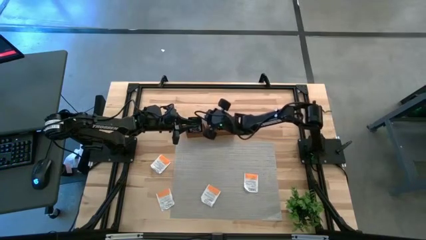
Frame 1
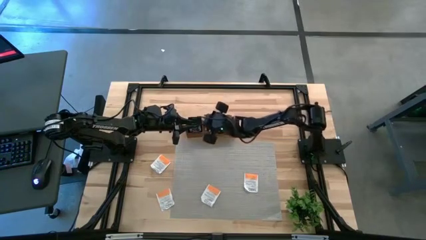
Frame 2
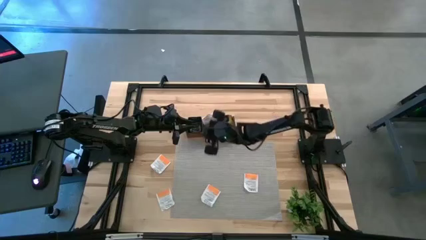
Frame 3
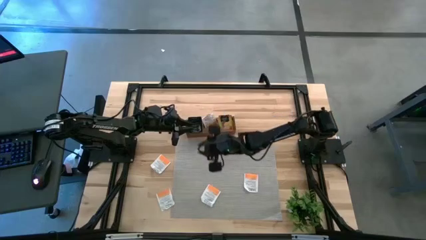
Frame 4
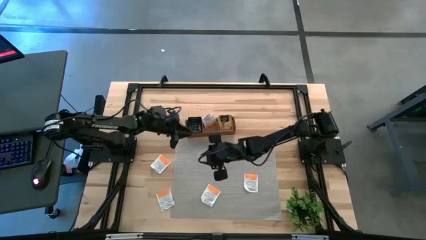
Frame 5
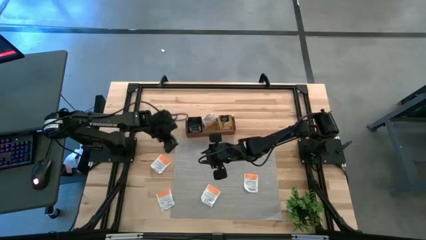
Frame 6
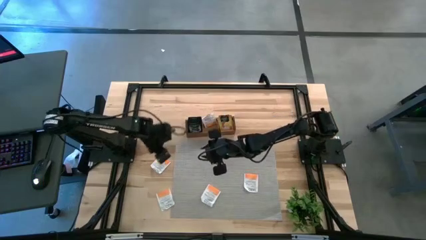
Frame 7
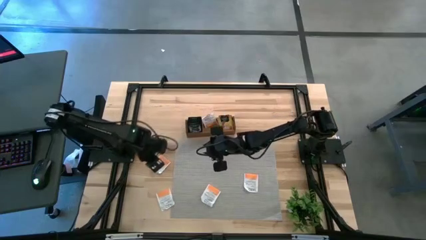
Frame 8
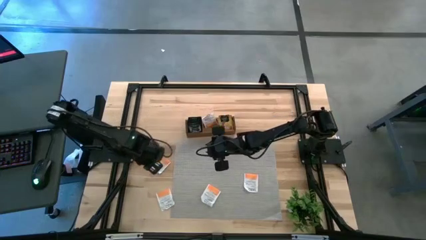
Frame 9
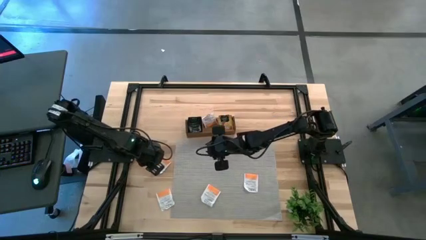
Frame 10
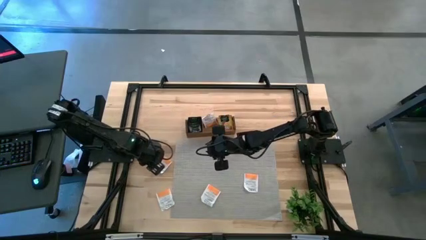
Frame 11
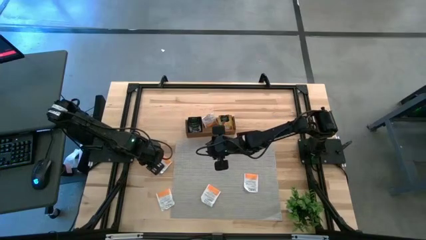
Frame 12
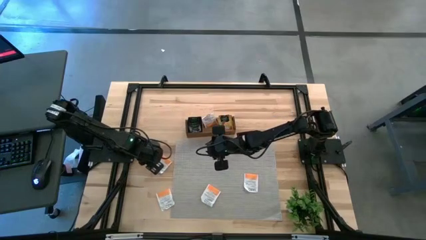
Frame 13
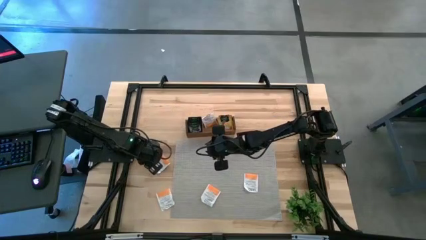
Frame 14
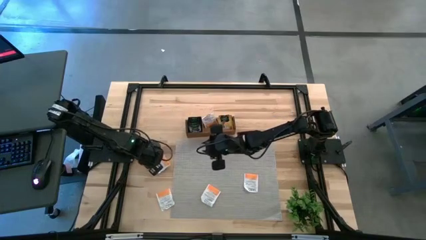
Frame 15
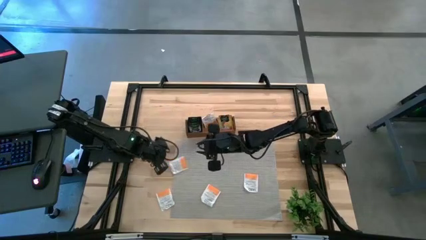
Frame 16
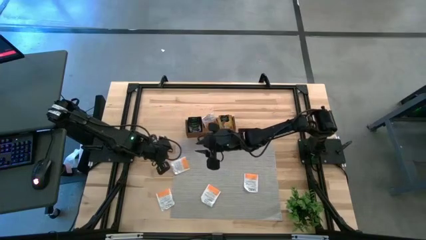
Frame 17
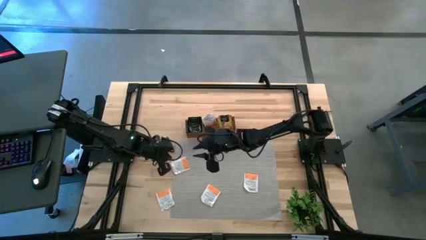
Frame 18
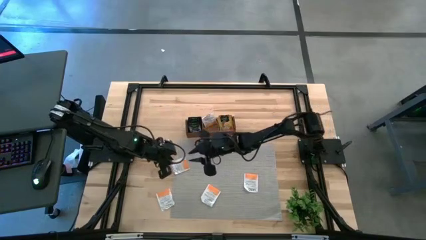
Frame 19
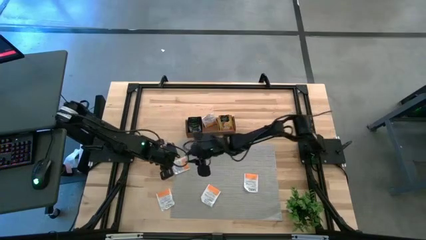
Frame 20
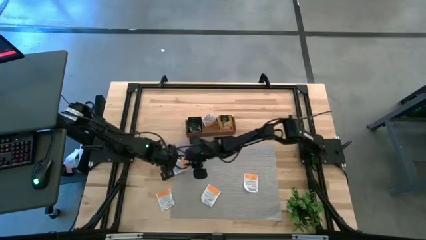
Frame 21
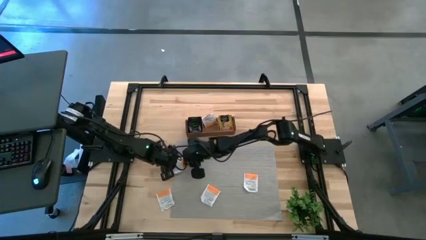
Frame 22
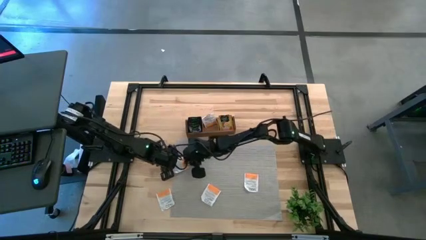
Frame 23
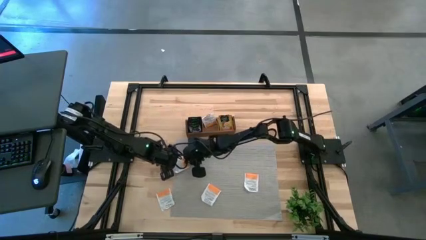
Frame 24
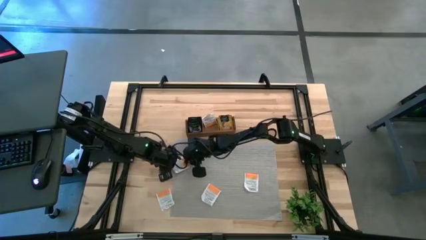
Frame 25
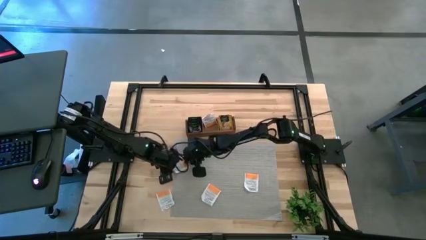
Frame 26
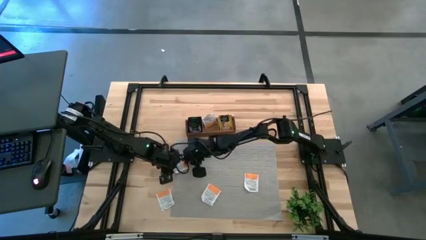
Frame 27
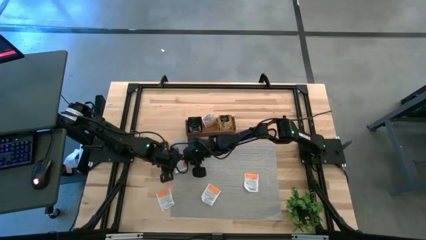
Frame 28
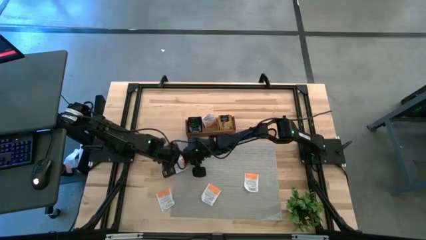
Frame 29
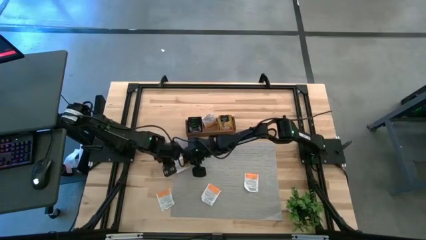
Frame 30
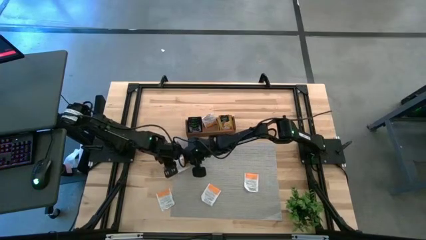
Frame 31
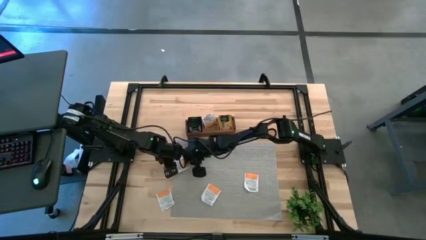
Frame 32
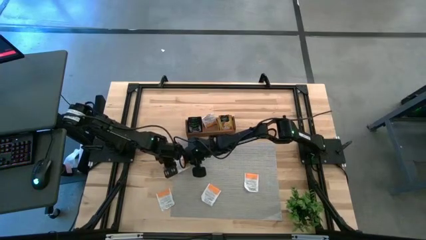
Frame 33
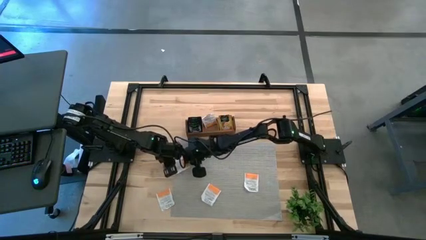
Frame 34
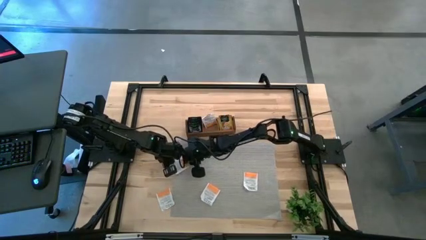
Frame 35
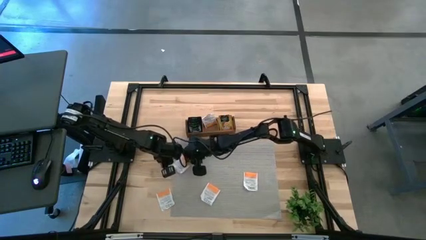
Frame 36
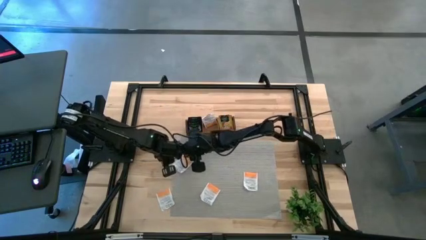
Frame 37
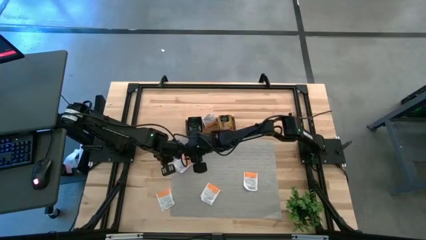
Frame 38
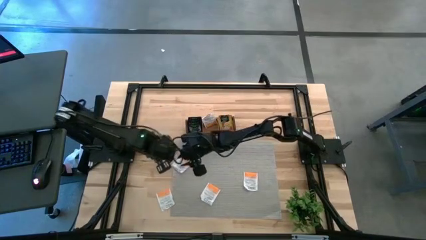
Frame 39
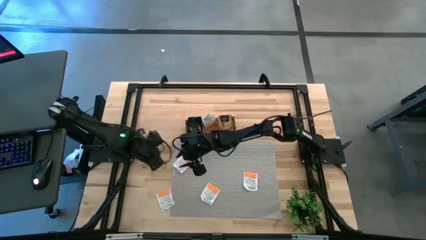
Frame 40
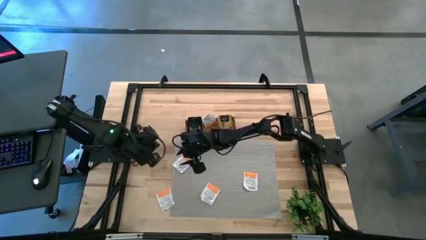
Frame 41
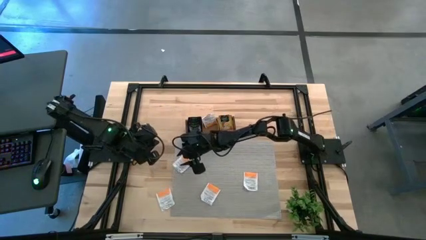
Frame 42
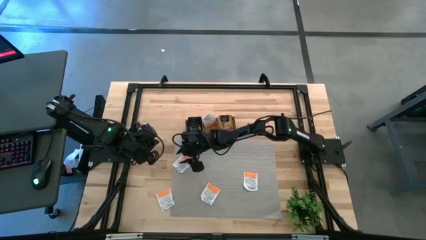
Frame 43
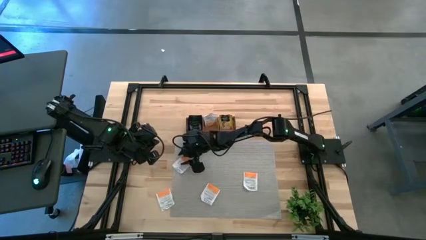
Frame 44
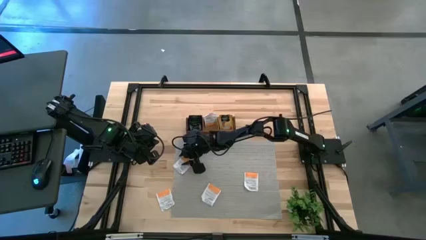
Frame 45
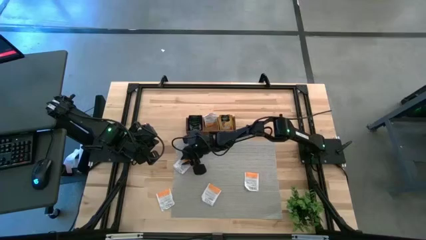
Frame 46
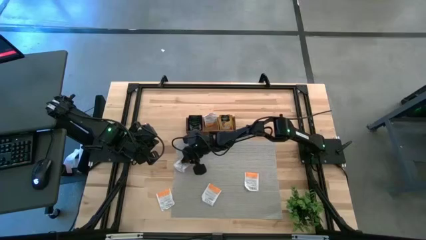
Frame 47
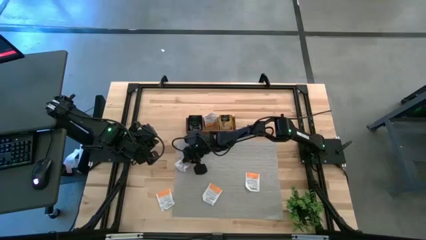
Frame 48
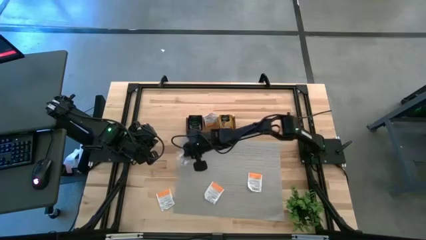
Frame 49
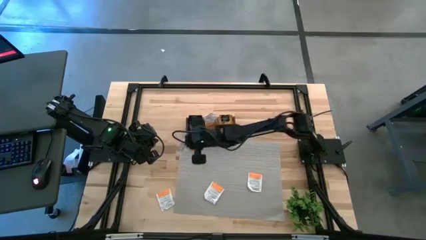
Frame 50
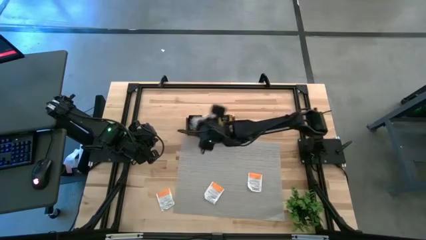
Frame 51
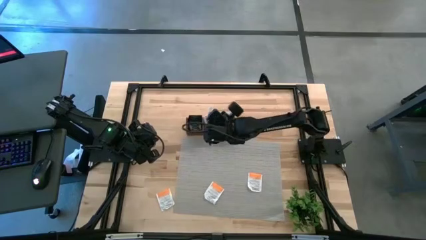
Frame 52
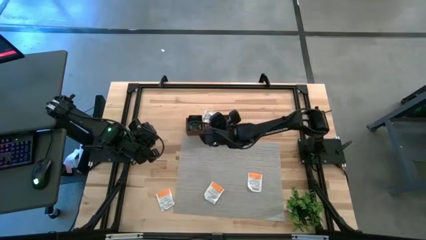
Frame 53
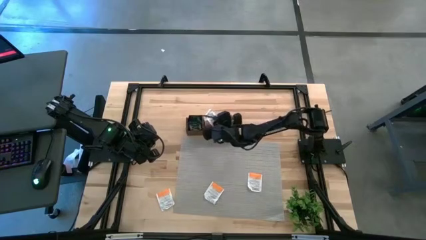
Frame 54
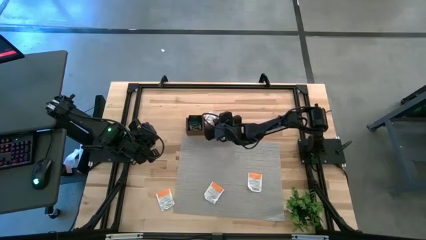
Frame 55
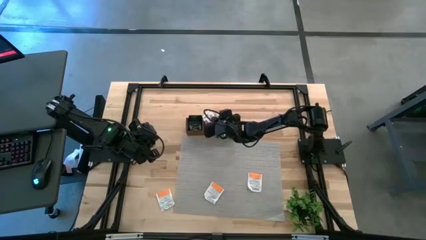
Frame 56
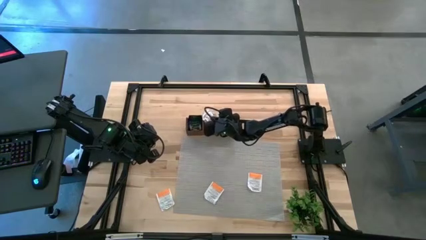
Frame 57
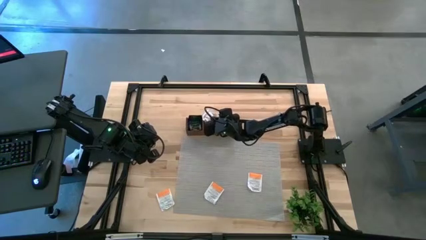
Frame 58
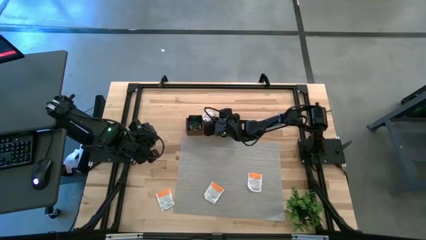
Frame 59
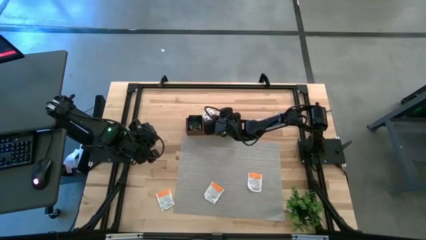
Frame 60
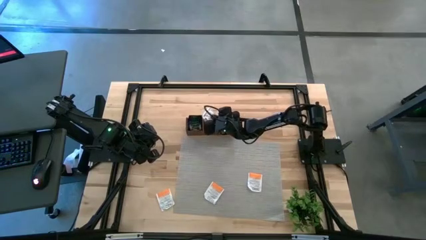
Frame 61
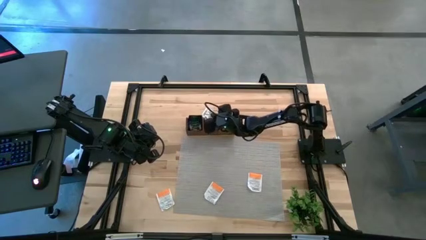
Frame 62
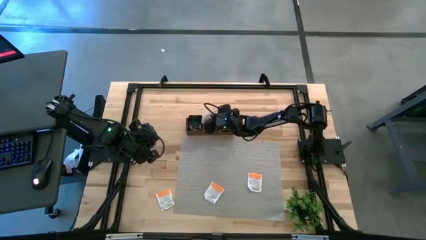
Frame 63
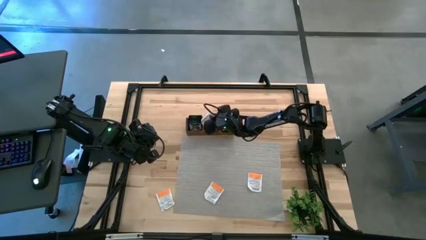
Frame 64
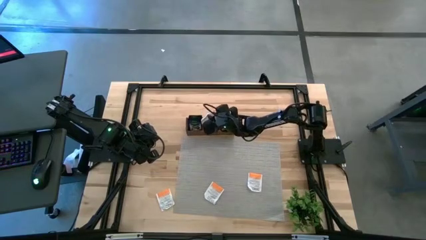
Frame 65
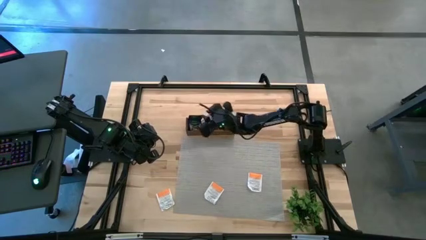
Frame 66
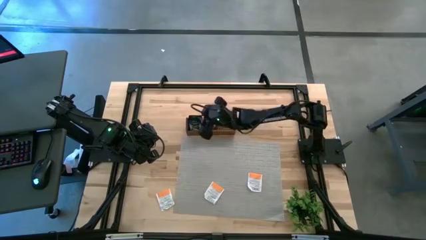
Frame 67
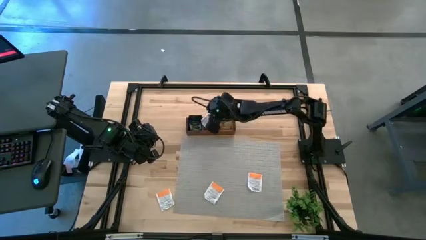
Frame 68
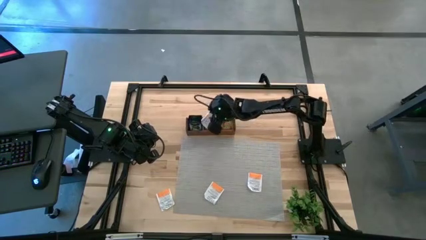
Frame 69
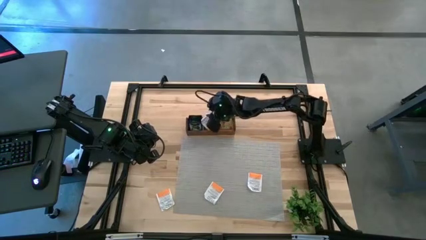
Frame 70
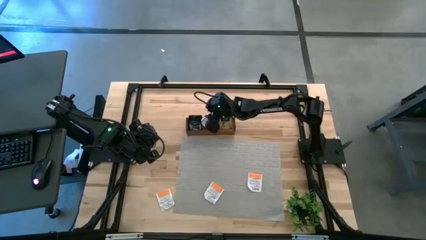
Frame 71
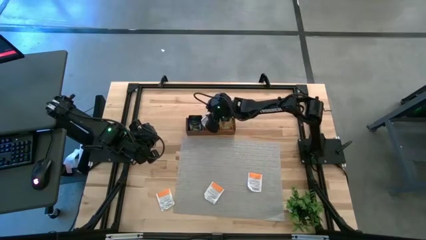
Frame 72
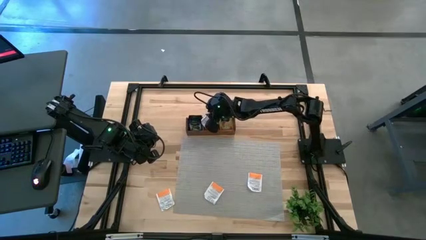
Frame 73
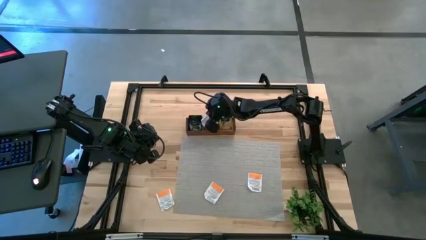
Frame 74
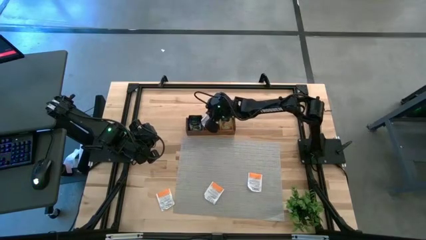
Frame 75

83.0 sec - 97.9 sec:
Task: Pick & Place Tea
Put the white tea bag into the middle section of the wooden organizer

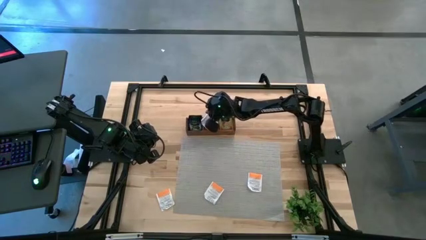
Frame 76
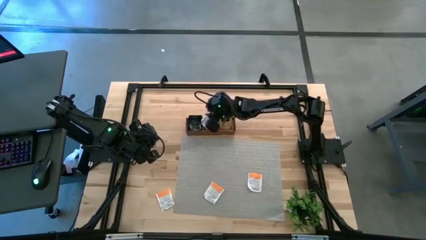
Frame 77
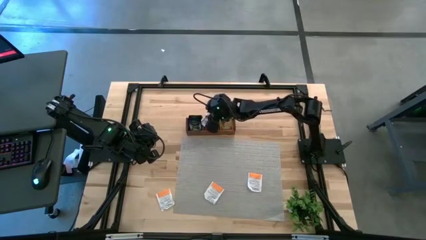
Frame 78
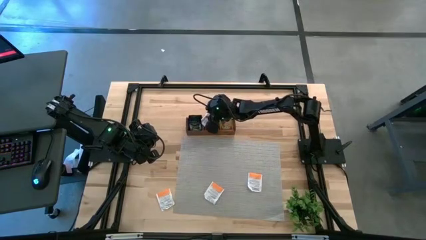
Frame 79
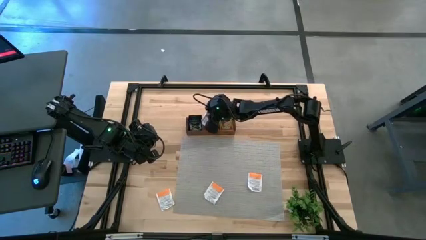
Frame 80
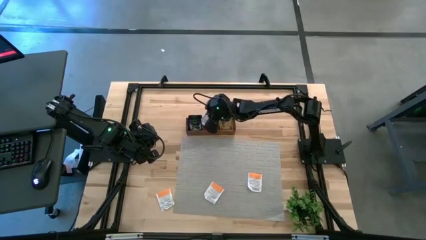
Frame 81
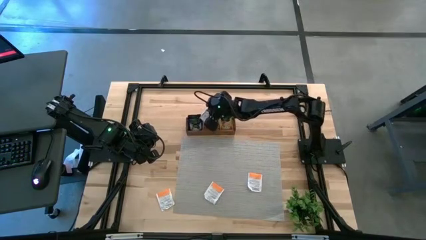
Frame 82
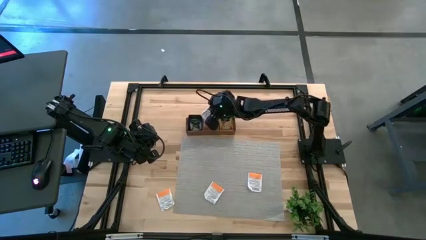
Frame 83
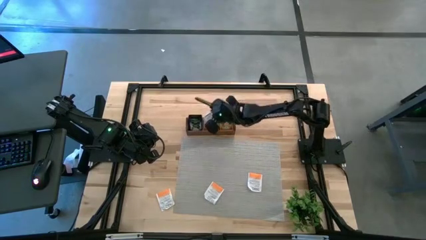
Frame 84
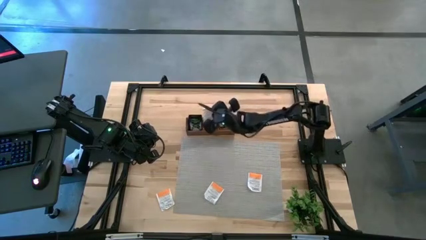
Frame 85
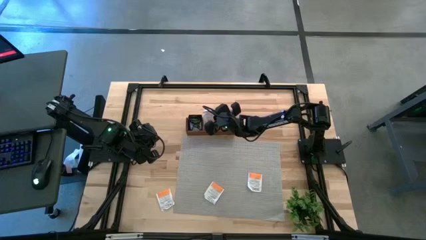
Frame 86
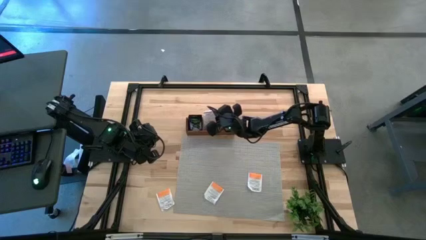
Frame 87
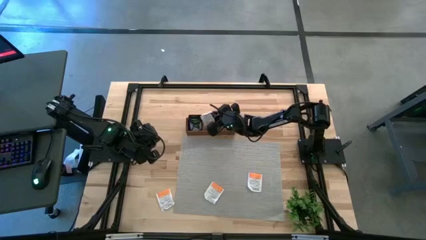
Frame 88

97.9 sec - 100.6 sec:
Put the white tea bag into the middle section of the wooden organizer
